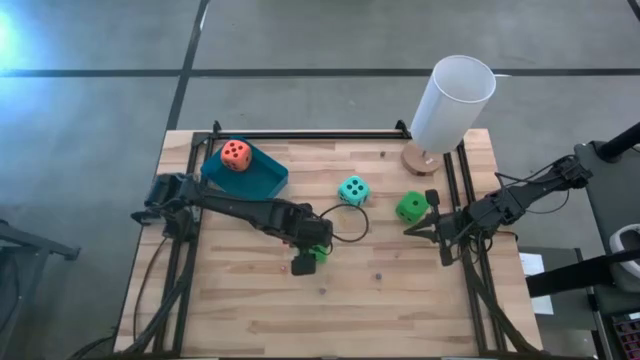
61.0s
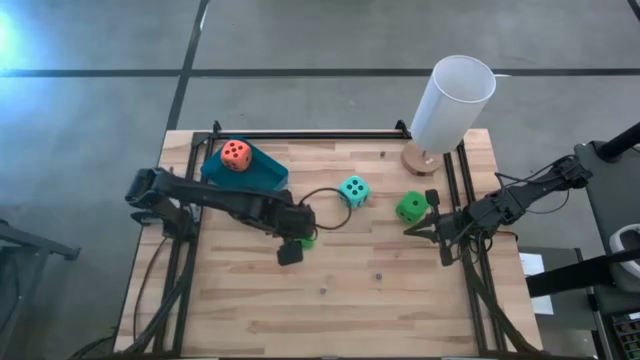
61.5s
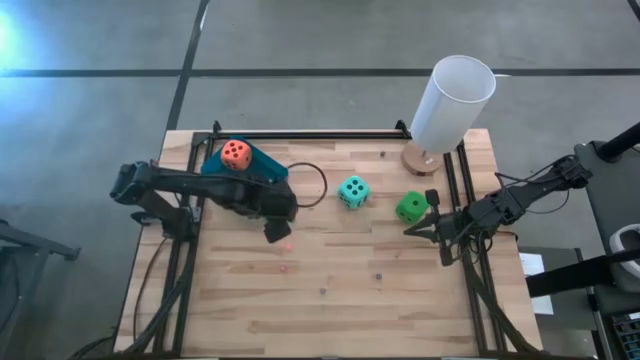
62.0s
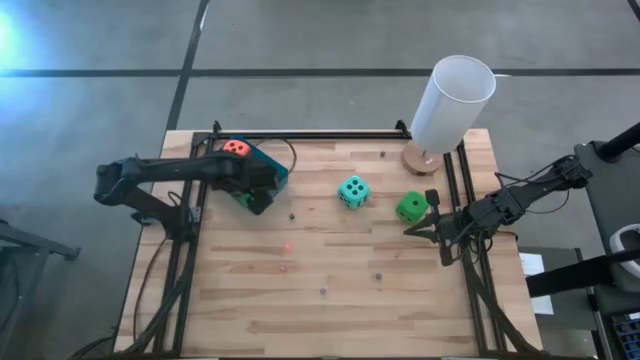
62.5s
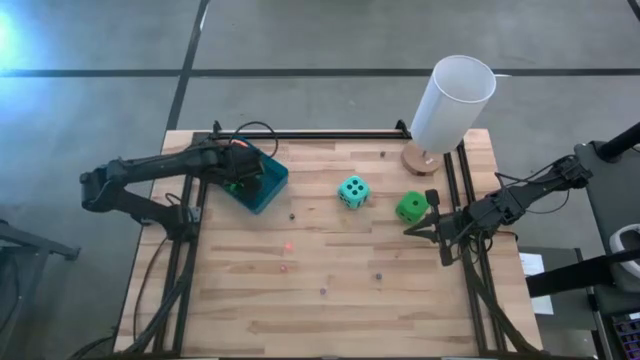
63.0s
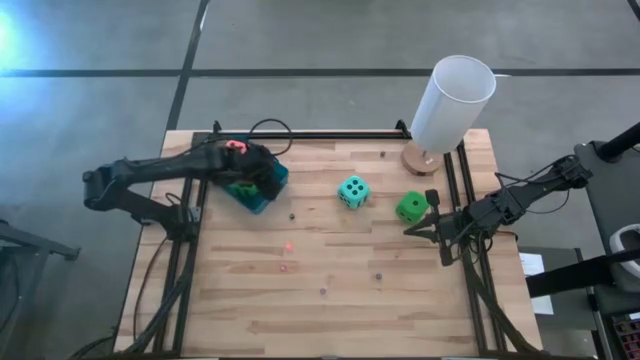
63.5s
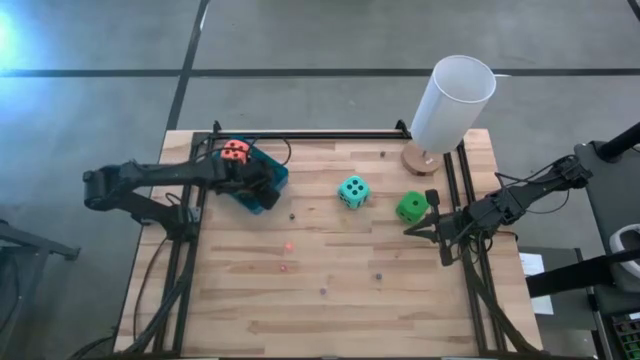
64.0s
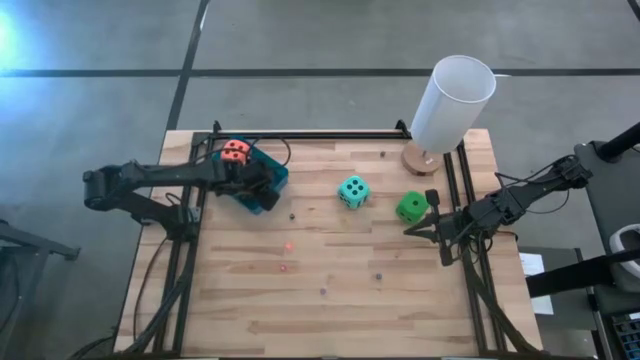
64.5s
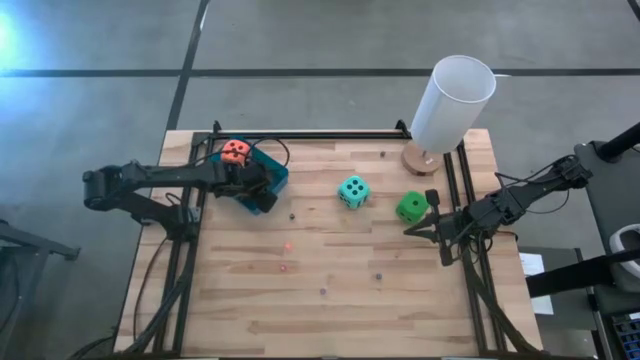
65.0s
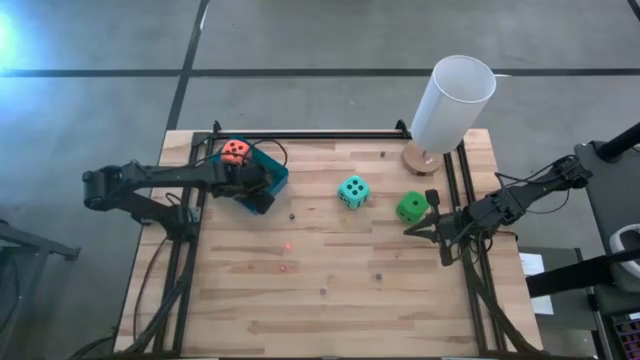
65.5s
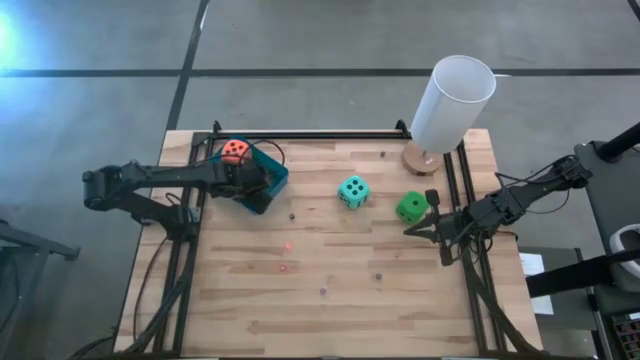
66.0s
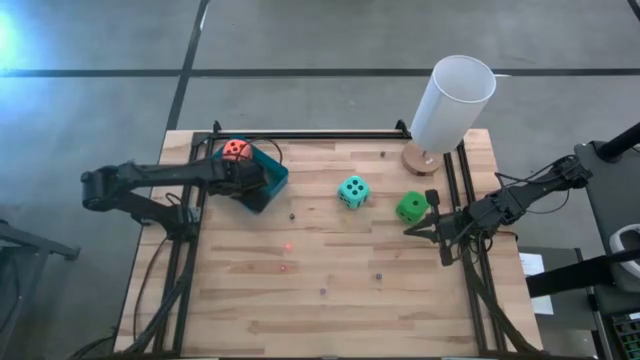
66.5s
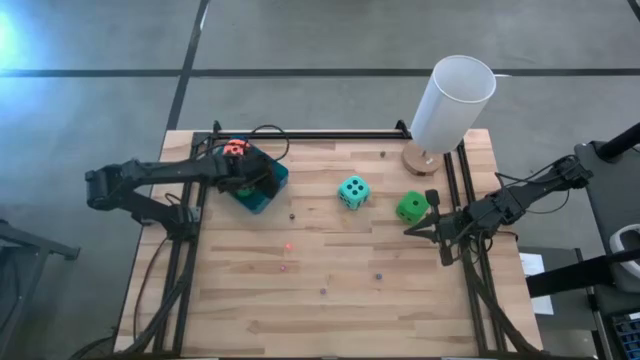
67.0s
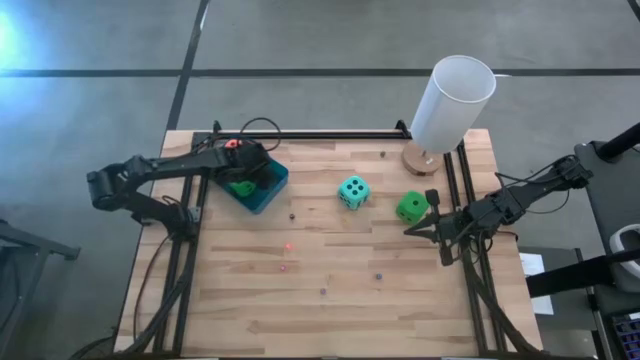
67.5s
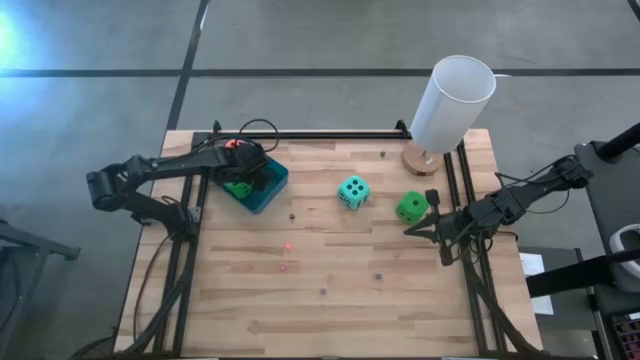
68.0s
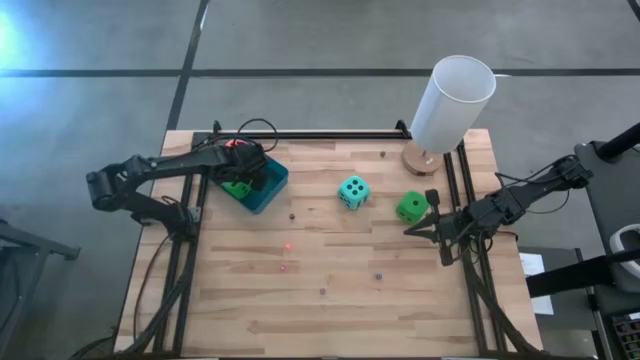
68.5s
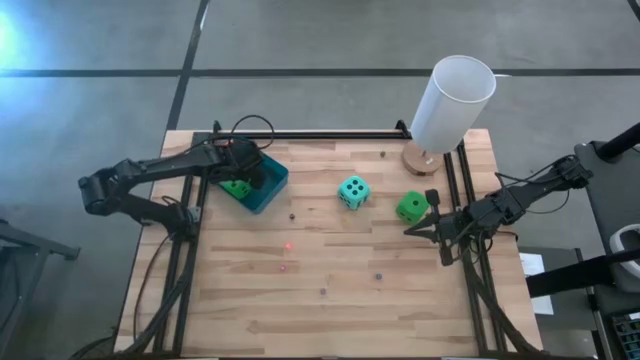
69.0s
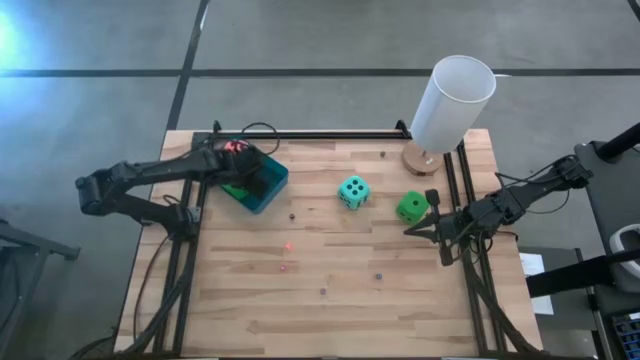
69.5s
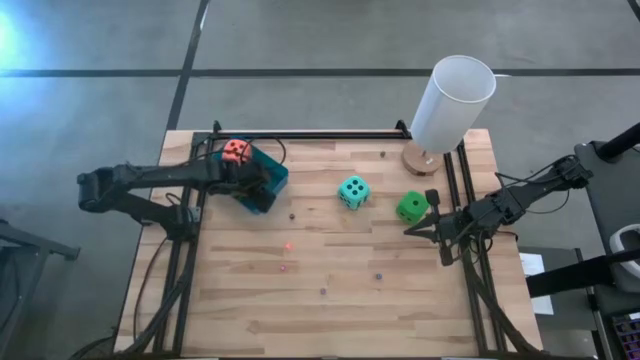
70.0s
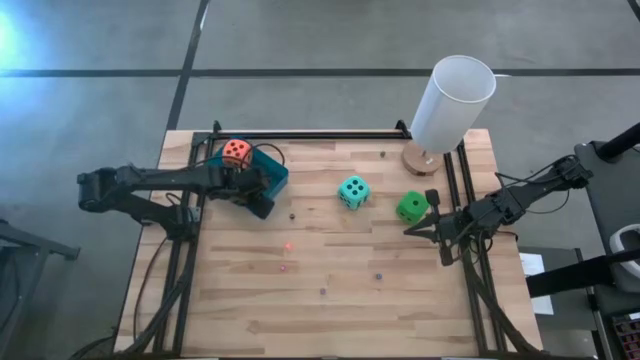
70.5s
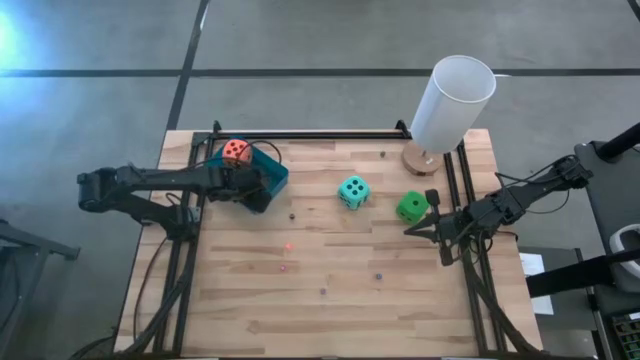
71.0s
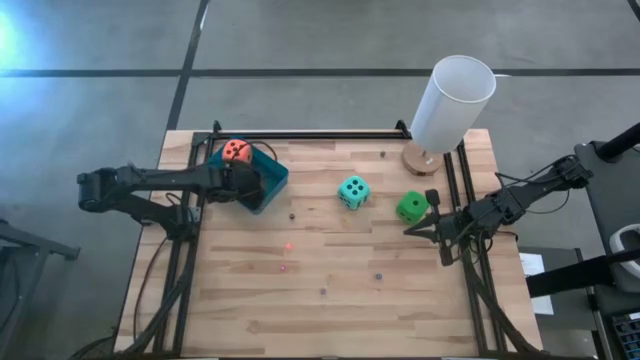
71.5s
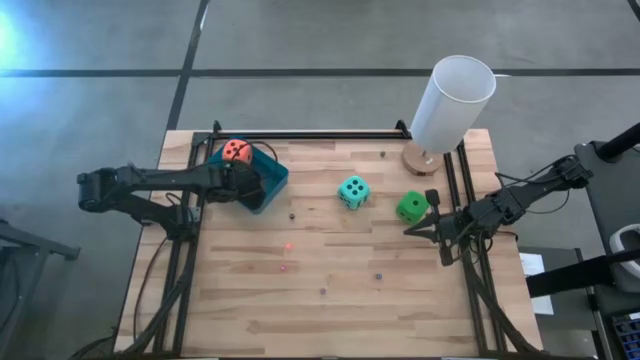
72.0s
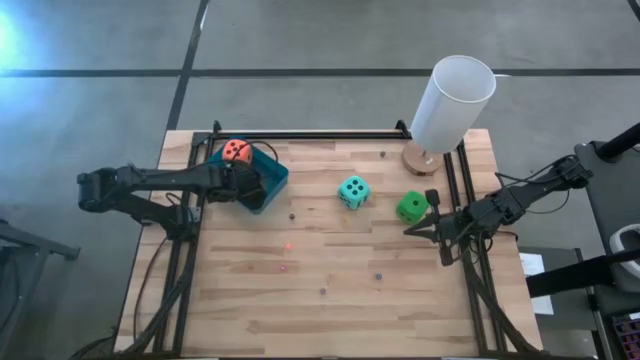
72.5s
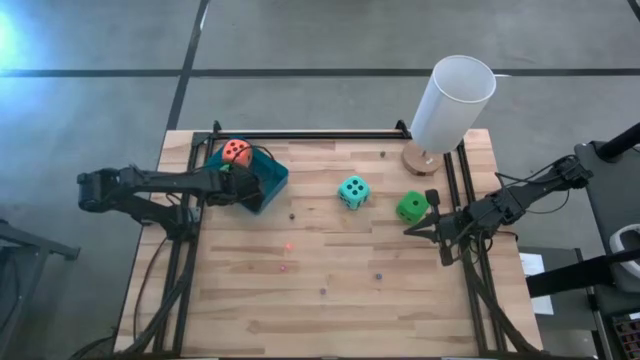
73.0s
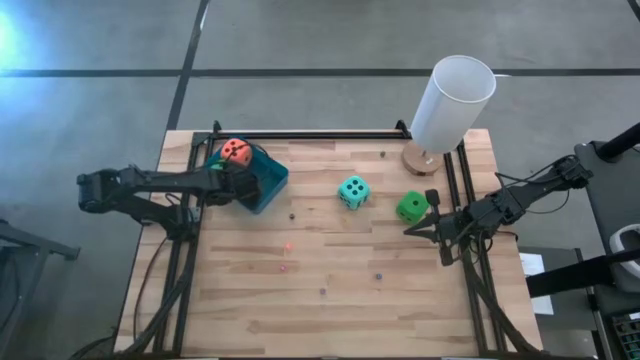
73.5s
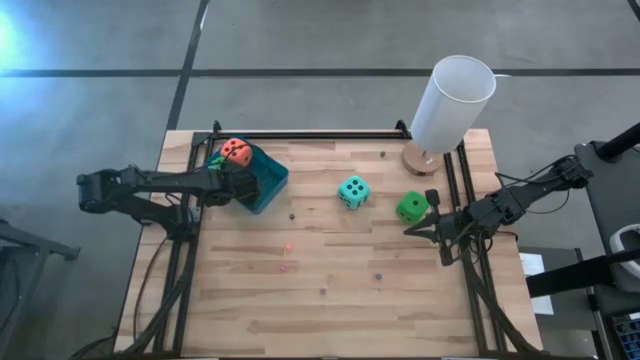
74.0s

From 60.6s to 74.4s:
Task: Pick & Place Dice
Put the big green dice on the left into the blue bin

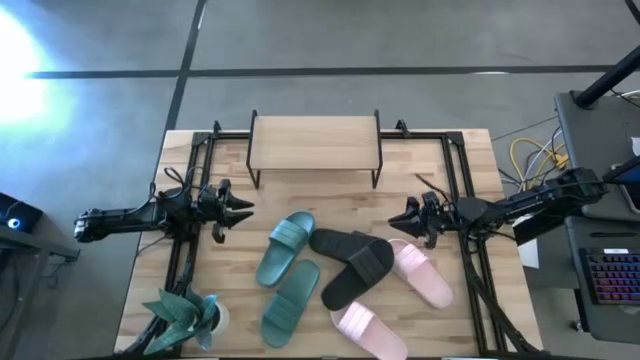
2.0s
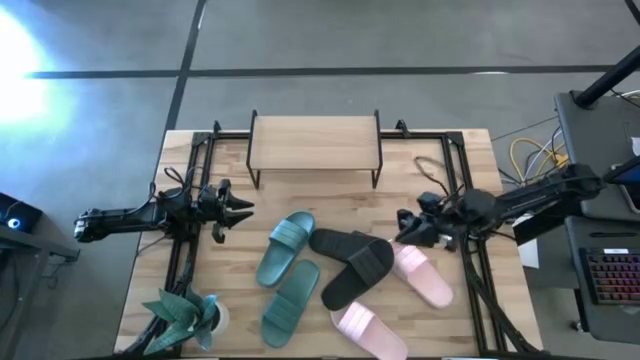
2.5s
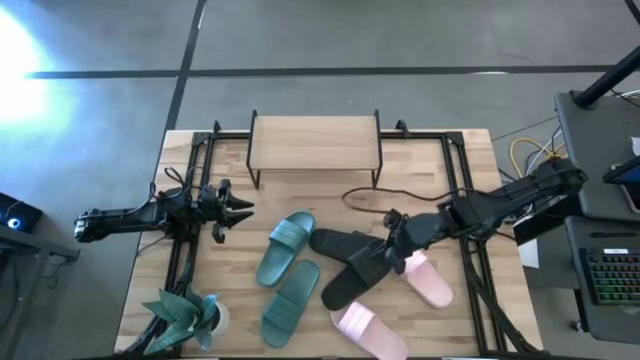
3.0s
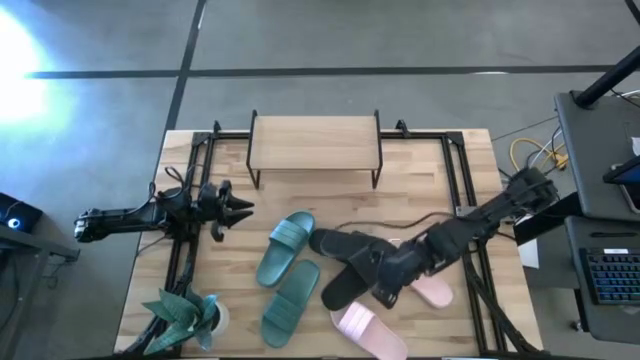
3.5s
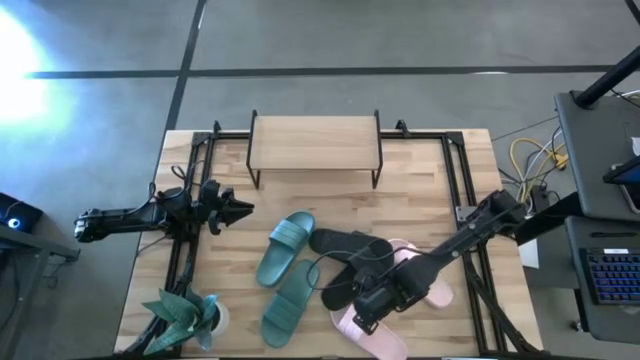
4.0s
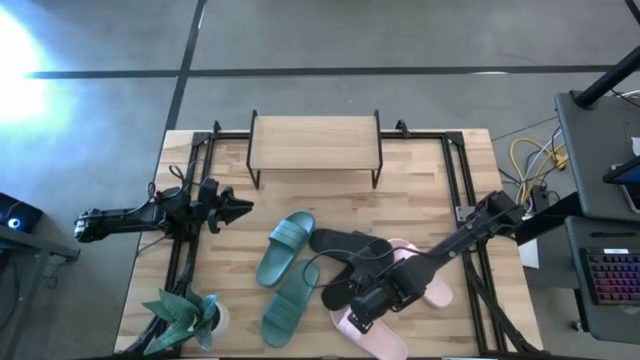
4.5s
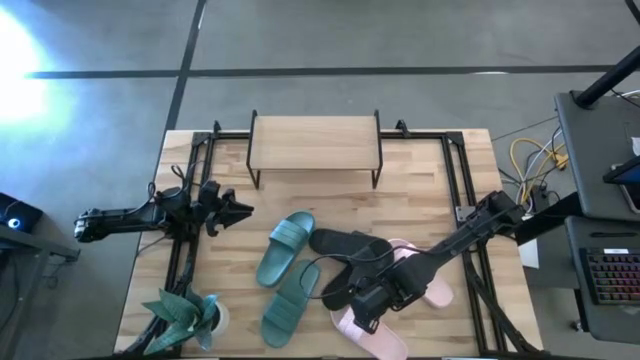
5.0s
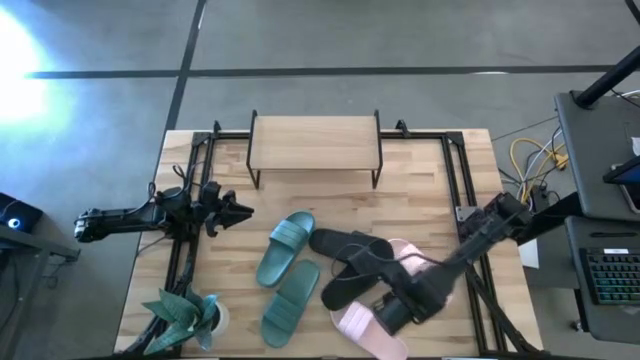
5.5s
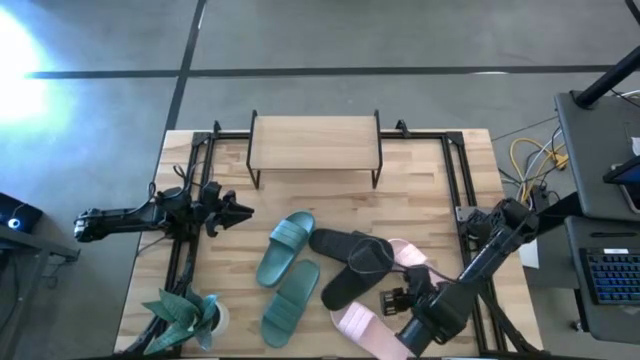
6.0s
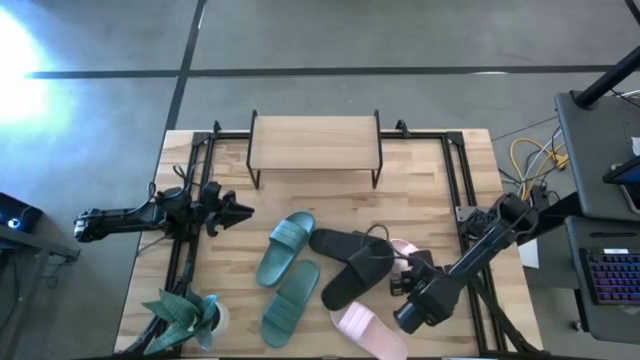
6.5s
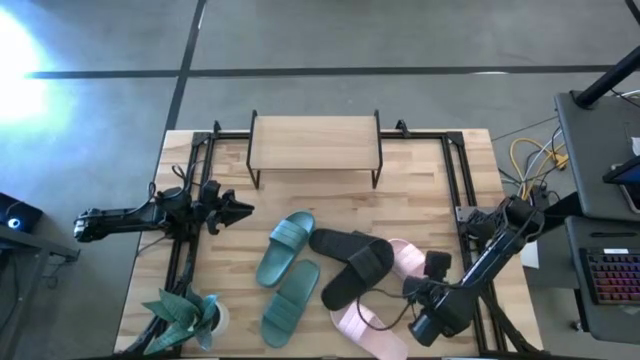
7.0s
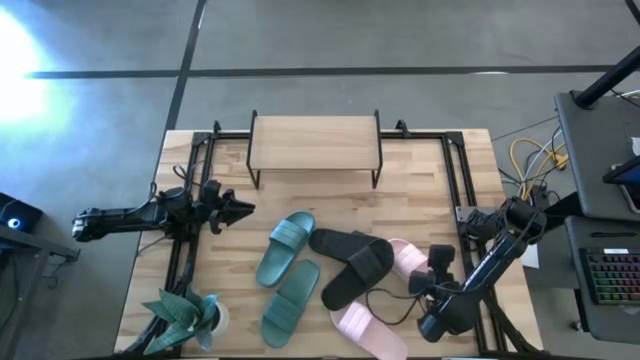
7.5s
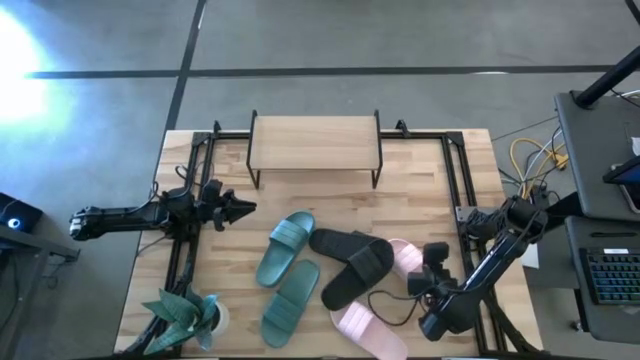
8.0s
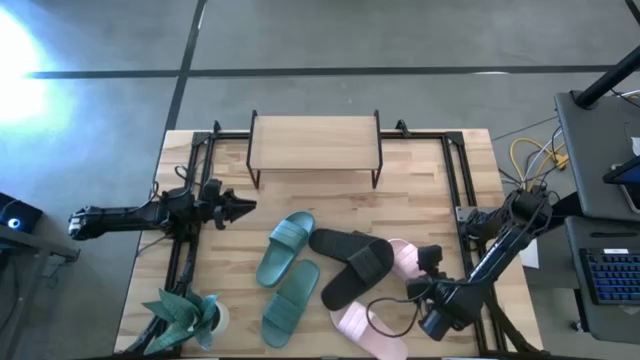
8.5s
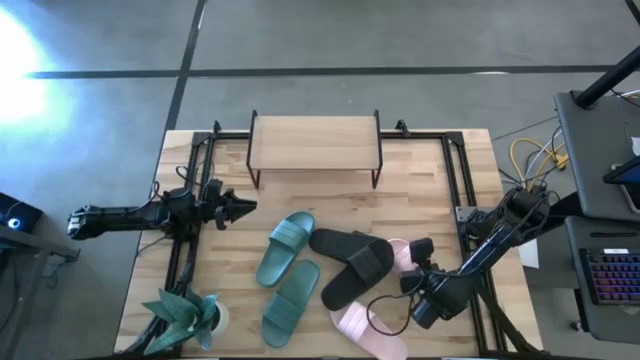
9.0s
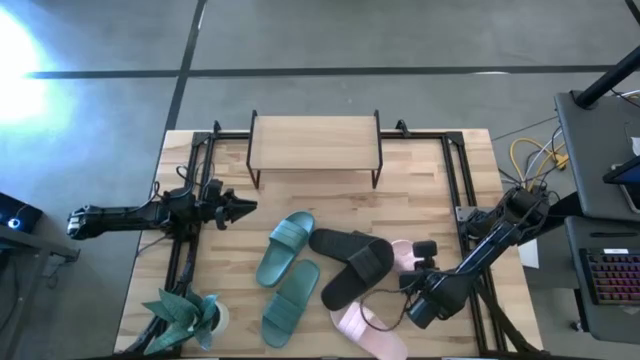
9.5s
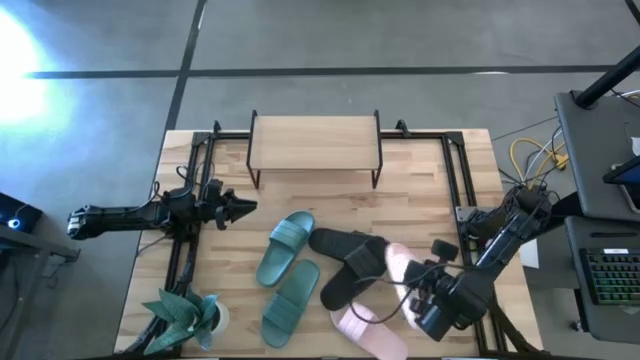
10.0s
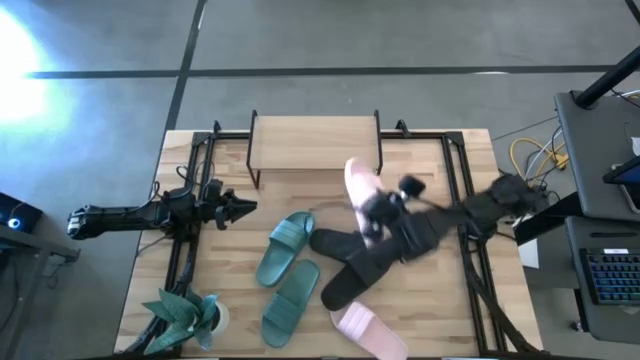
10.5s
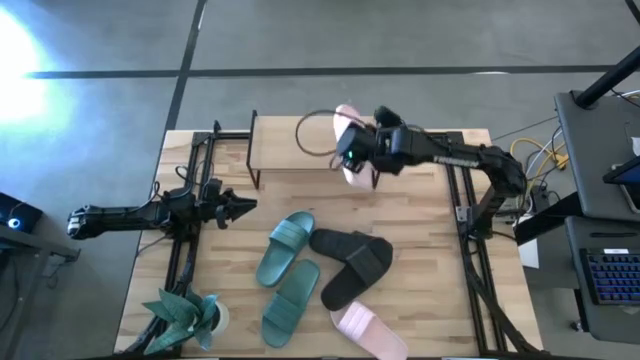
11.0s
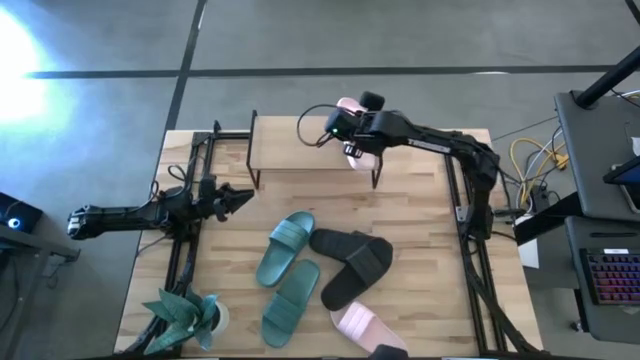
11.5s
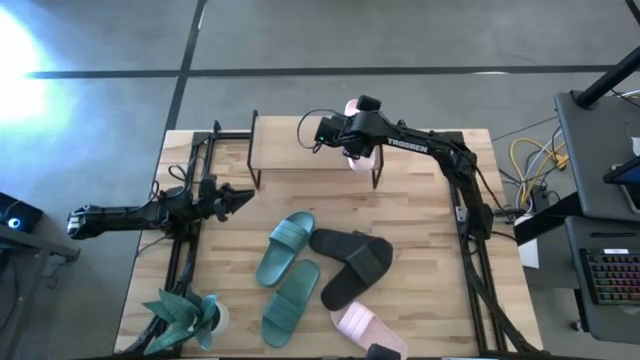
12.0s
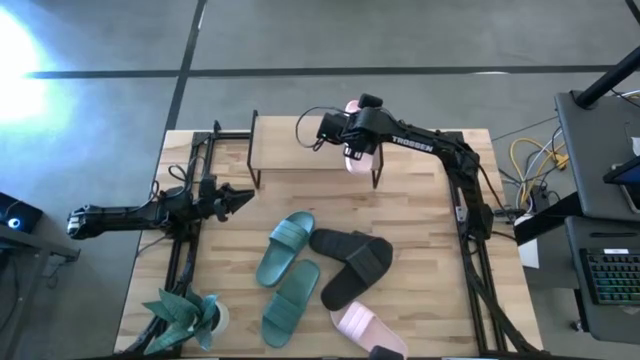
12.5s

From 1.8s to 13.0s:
Task: Pick and place slides into the shelf
Put the top pink slipper on the shelf
